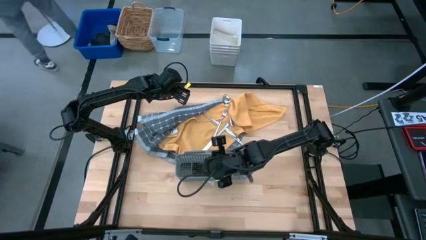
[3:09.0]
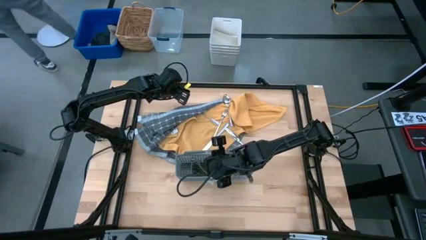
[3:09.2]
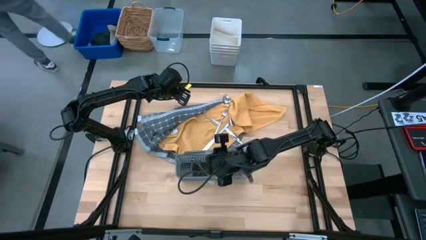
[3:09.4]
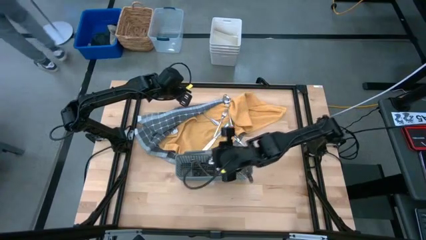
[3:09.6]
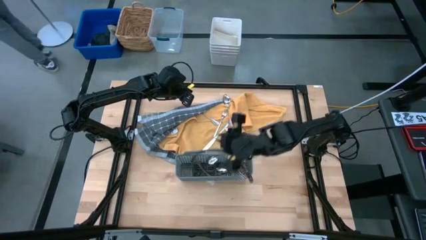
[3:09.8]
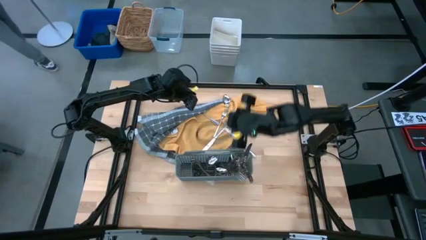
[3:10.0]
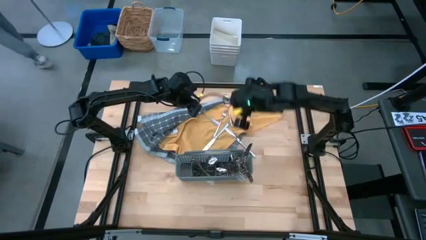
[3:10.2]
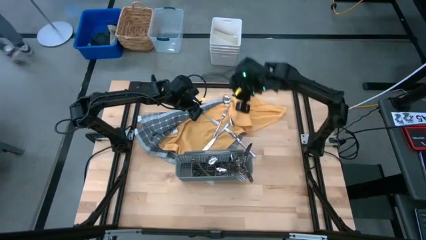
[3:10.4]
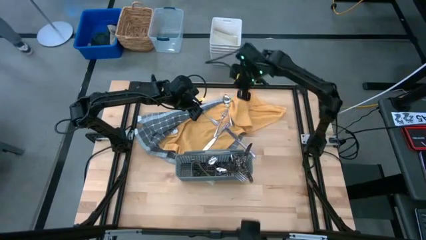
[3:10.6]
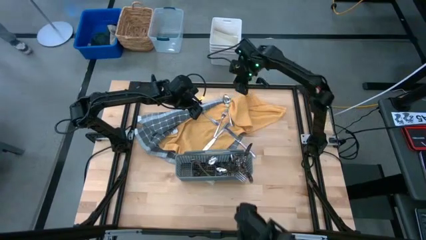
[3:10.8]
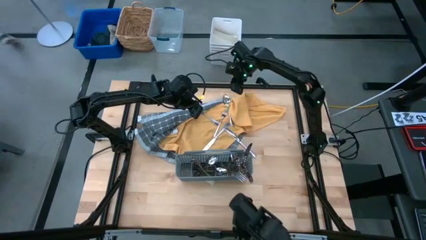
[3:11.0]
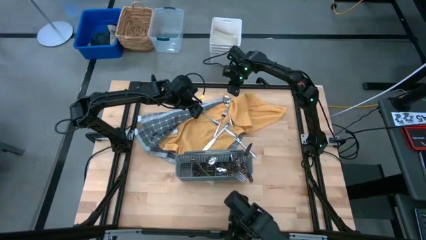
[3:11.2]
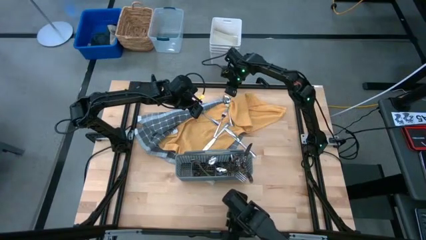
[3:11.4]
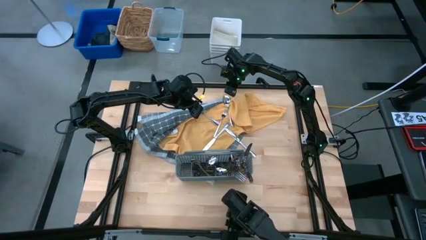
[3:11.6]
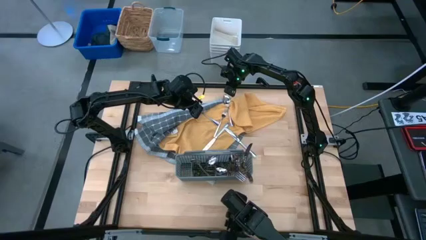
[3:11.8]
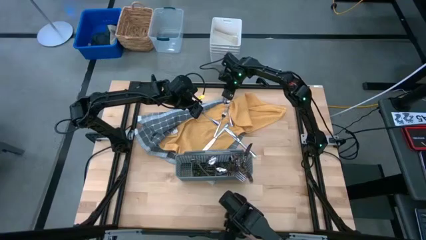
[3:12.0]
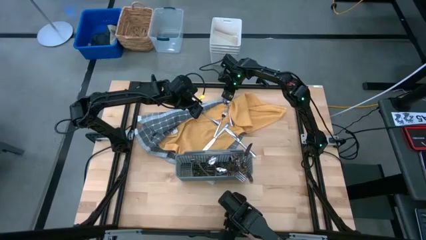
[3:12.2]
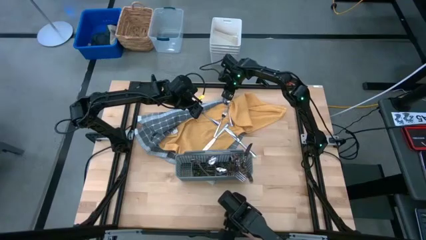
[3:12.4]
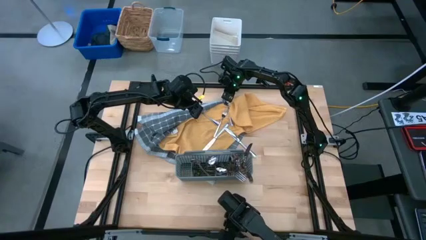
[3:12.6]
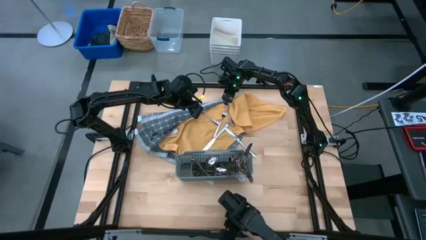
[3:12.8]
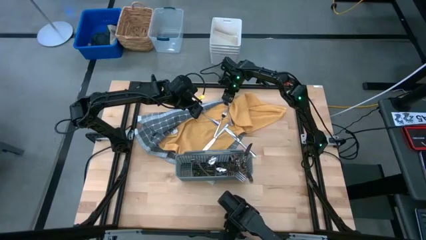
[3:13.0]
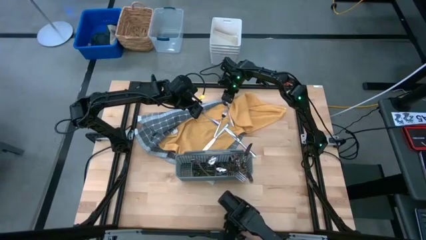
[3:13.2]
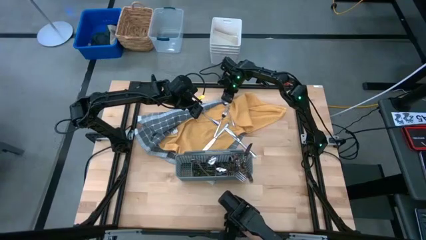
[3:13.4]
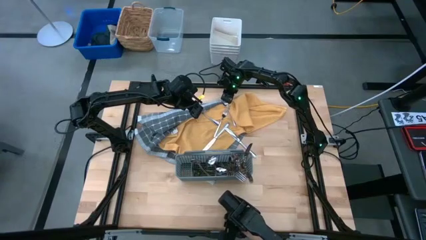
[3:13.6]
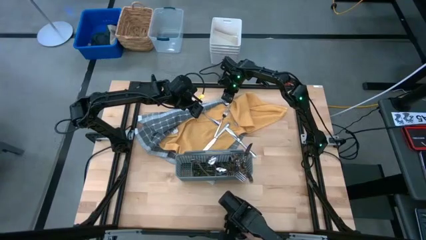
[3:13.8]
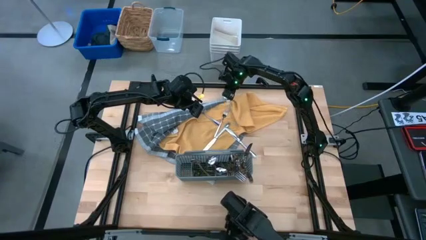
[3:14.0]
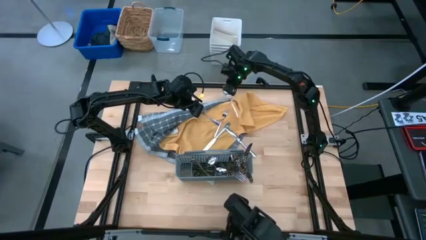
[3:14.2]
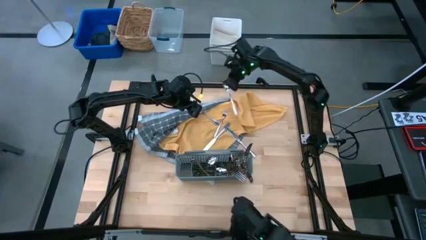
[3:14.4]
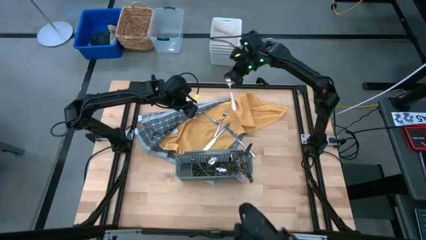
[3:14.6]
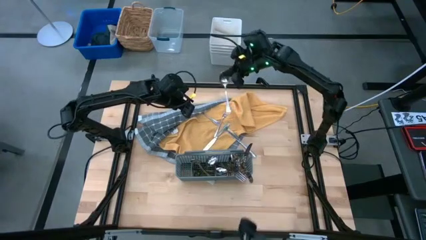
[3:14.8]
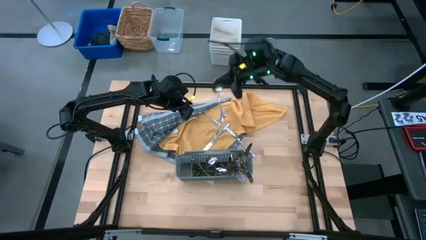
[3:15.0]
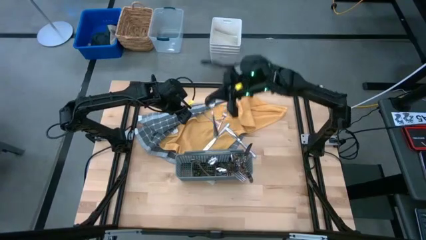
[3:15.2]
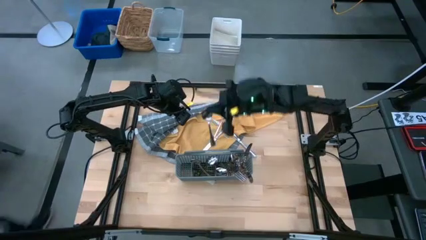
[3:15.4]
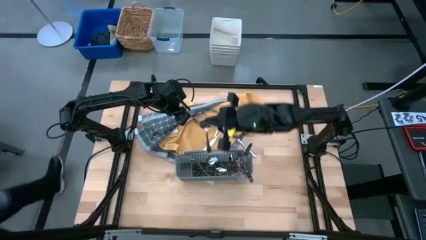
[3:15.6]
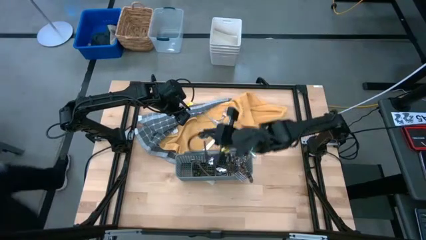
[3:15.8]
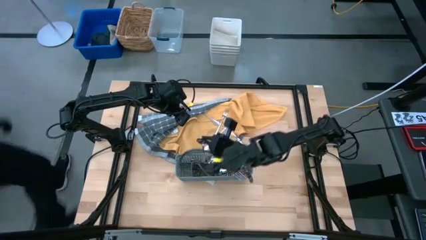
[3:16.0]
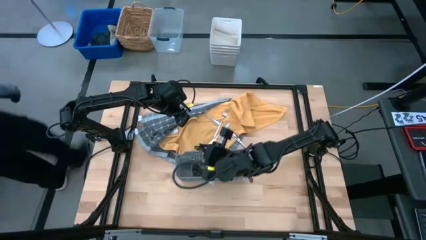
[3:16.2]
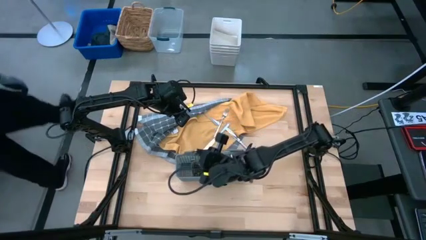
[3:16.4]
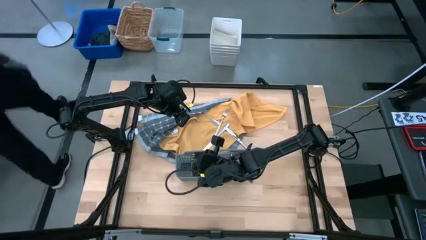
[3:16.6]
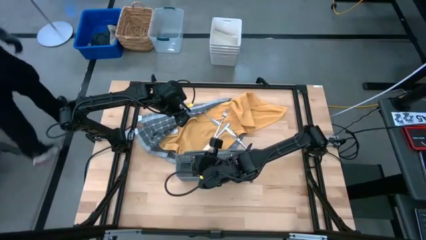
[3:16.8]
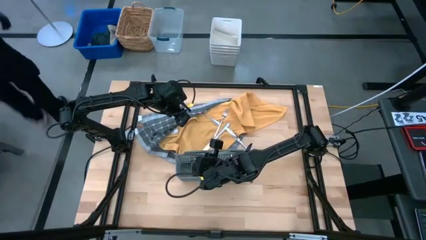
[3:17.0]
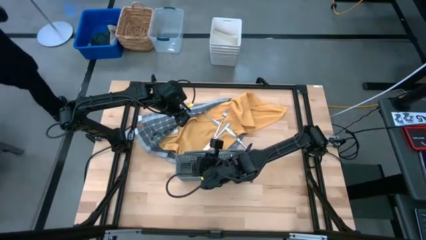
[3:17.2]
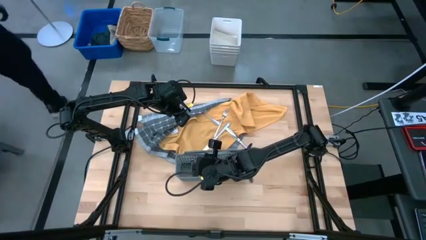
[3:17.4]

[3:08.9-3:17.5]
Task: Sort silverware
Put the silver fork into the gray silverware basket

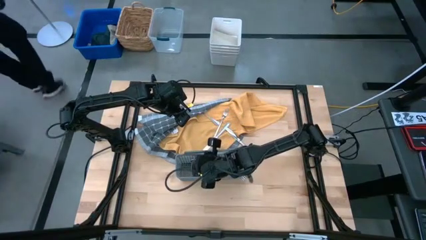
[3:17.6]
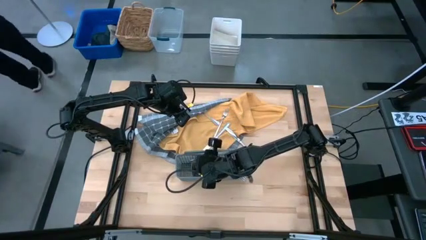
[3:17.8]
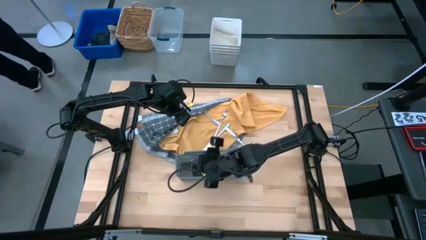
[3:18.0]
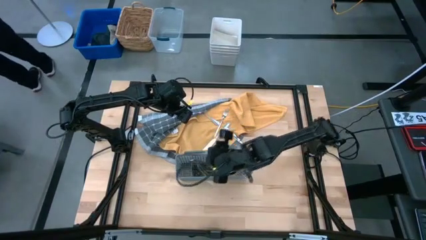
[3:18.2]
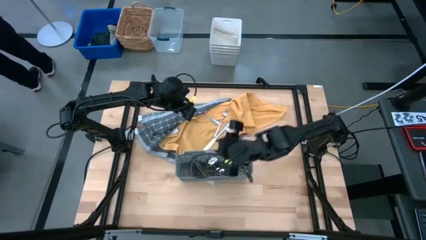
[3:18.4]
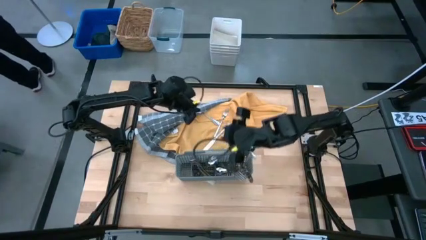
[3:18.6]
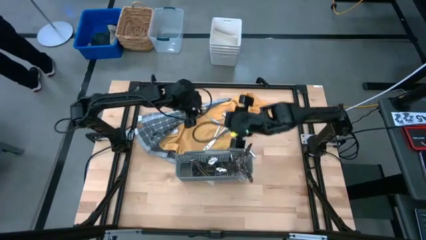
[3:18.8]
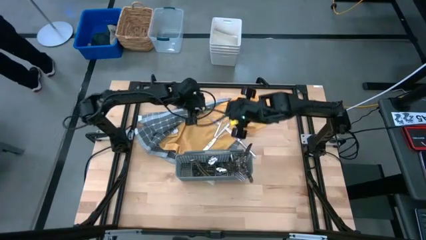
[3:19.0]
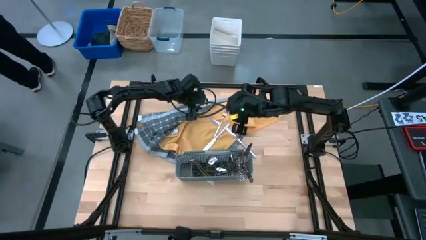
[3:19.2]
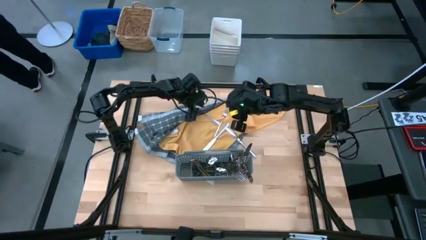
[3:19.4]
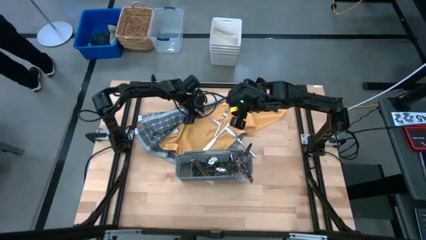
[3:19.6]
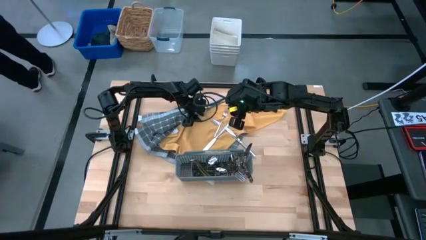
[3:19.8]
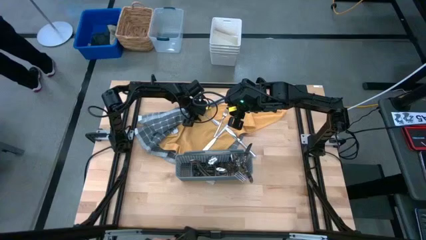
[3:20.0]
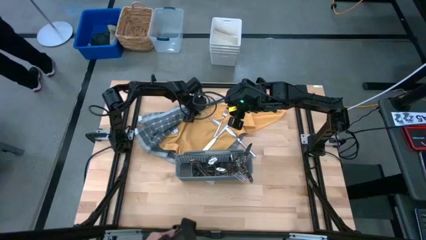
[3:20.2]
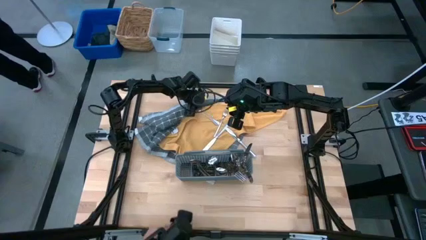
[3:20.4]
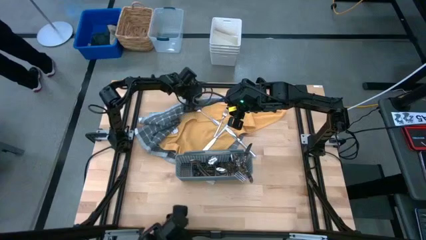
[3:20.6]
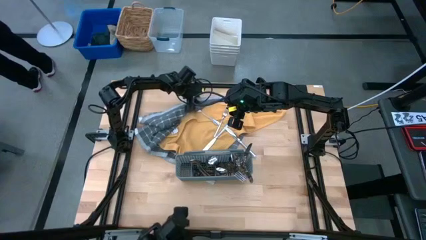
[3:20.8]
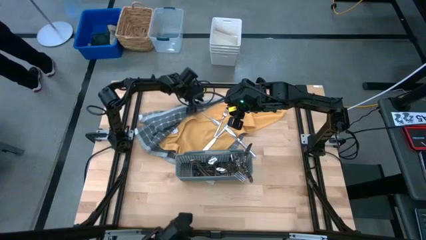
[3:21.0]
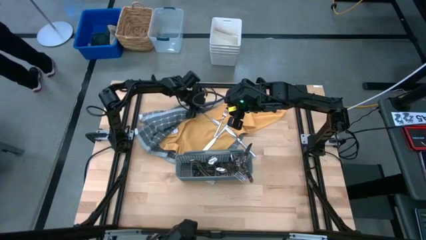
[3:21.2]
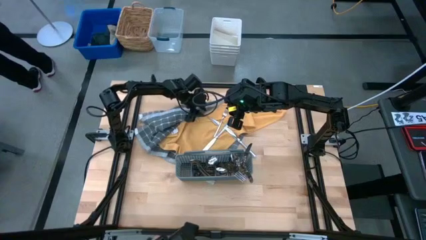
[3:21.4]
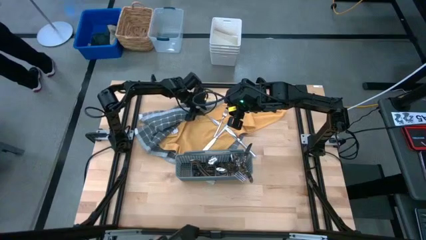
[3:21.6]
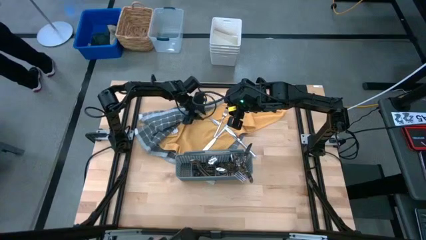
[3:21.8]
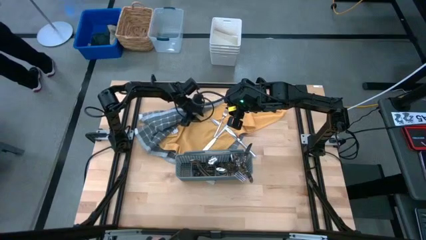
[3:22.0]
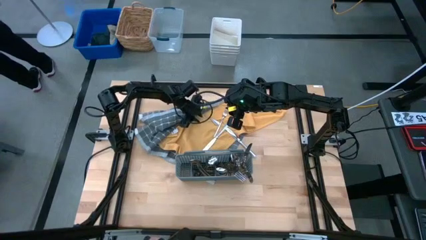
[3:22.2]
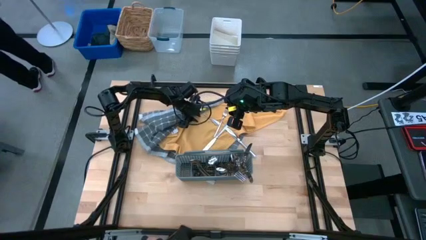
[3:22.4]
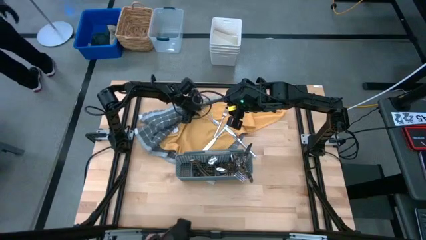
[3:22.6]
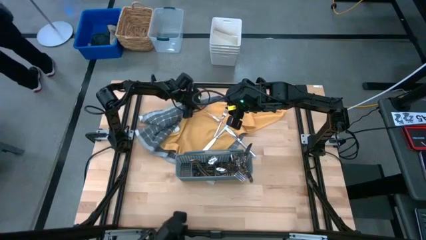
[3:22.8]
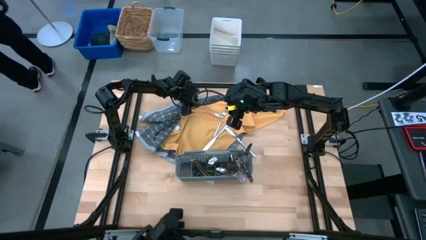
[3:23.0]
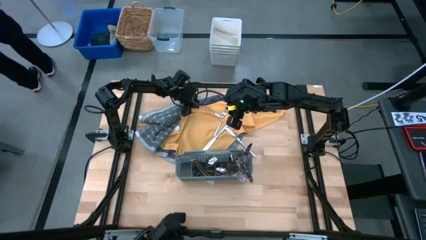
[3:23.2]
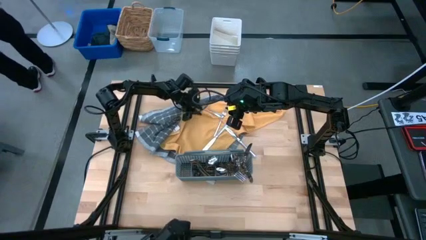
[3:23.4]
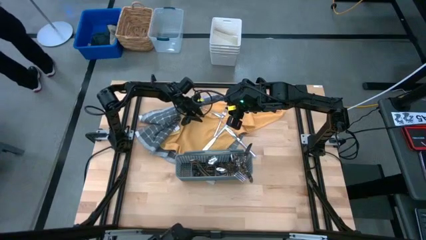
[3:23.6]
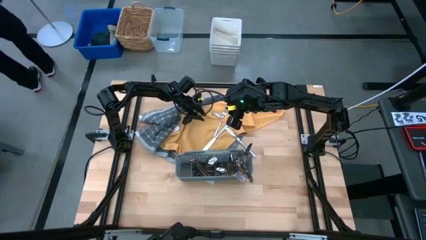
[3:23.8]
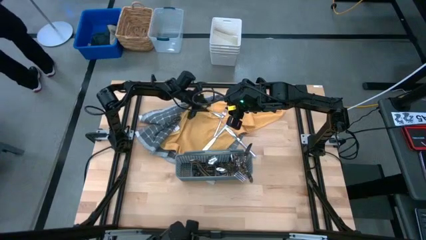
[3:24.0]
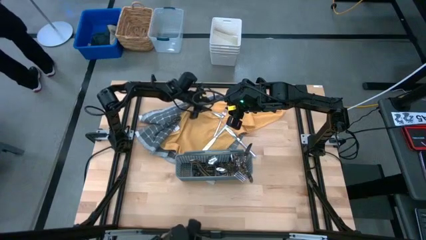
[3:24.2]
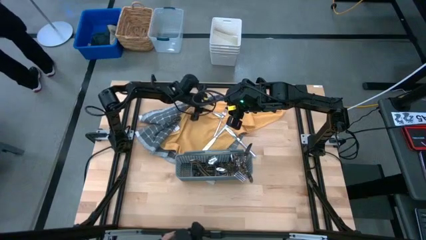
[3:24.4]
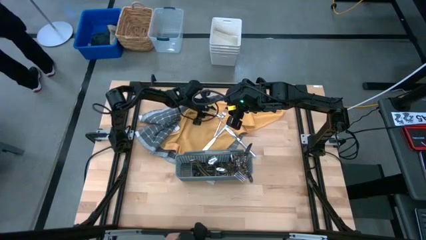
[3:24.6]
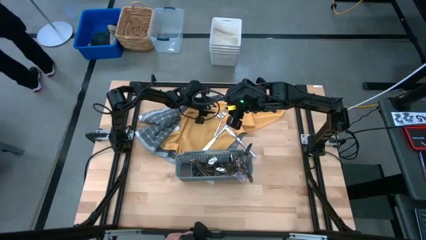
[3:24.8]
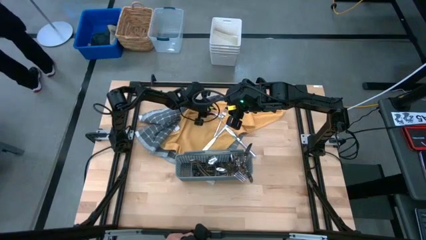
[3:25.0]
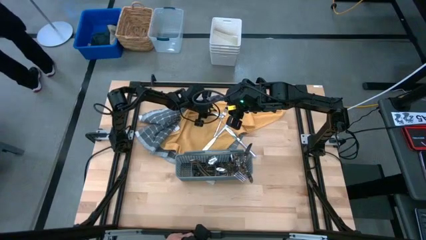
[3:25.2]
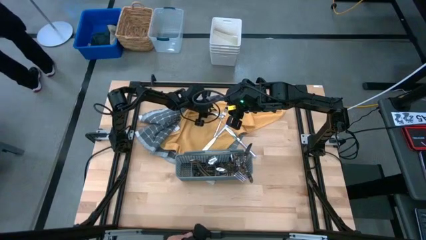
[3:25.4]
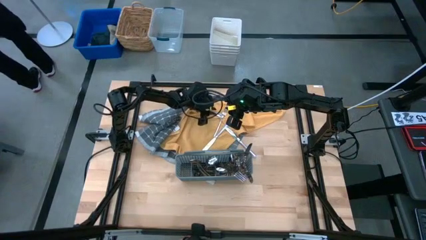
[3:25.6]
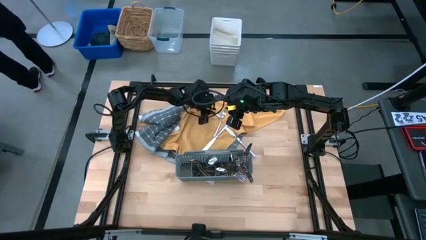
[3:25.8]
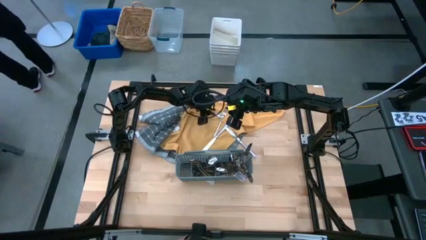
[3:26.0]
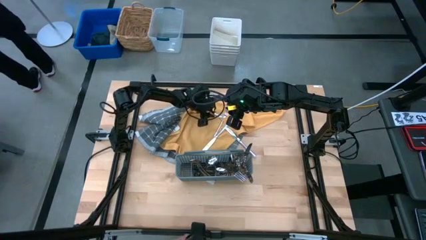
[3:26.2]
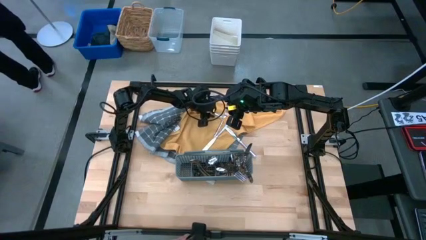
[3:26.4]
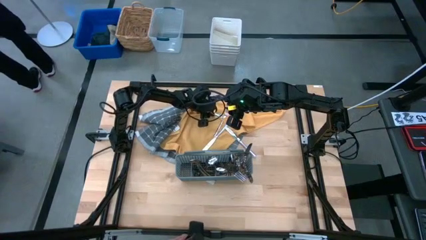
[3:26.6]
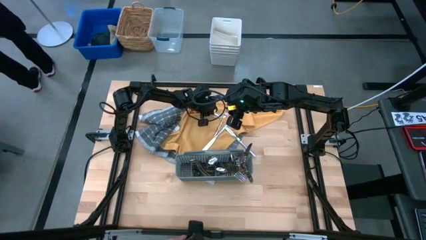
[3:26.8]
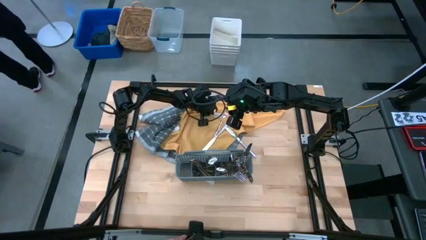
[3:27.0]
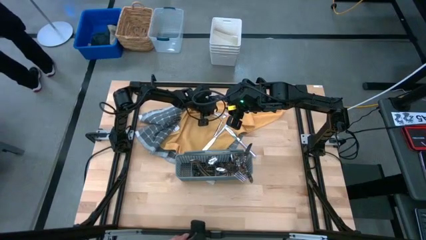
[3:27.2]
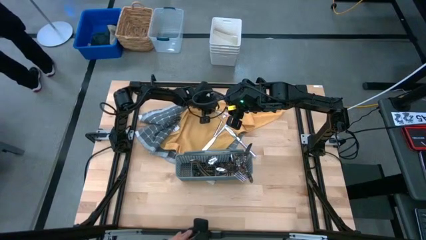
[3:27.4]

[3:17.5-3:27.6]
Put the silver spoon into the gray silverware basket
